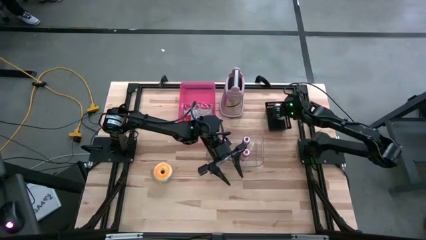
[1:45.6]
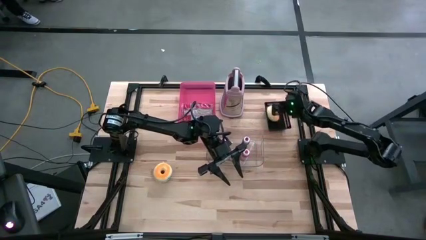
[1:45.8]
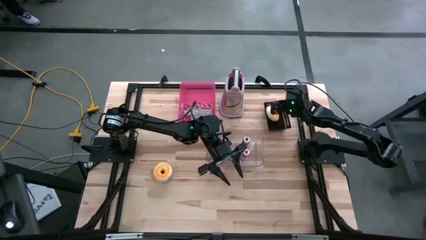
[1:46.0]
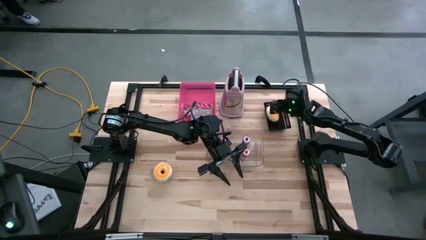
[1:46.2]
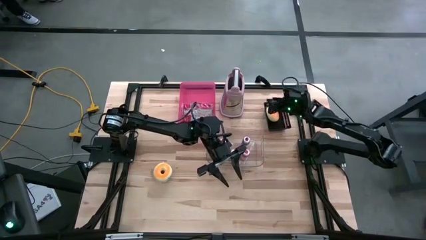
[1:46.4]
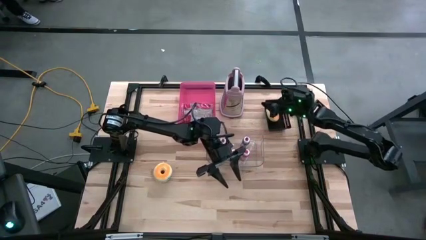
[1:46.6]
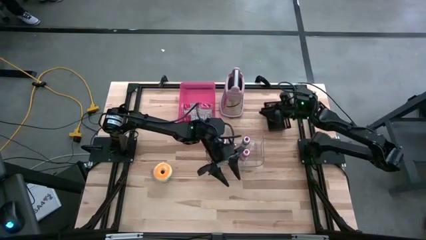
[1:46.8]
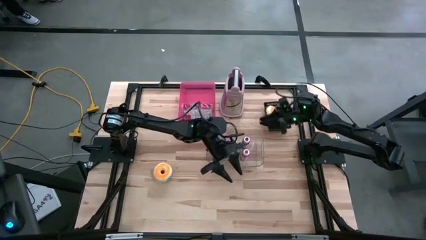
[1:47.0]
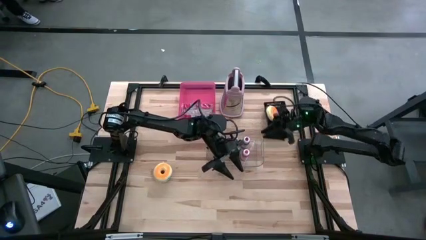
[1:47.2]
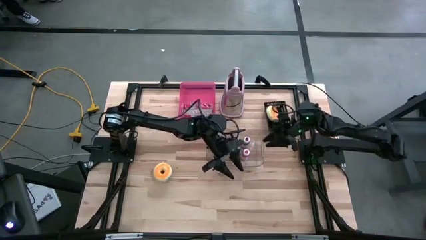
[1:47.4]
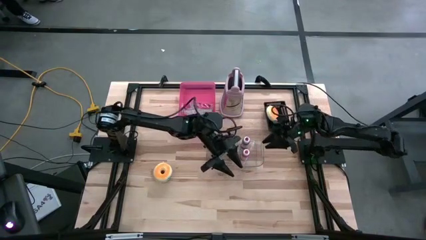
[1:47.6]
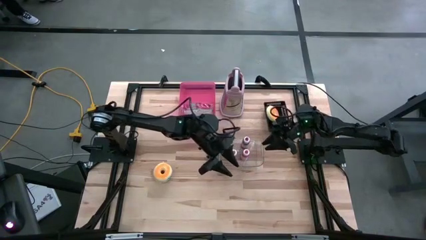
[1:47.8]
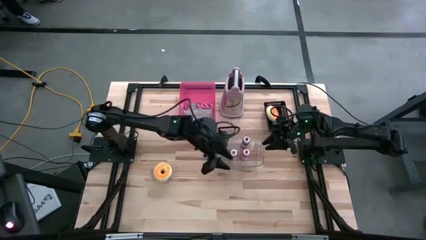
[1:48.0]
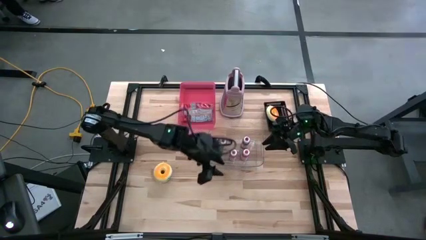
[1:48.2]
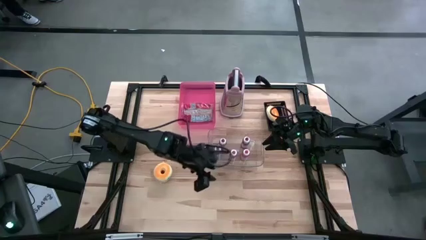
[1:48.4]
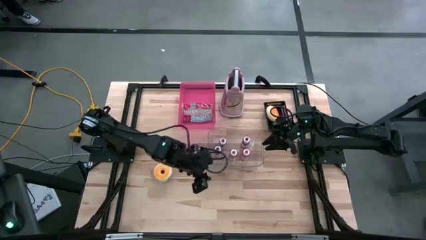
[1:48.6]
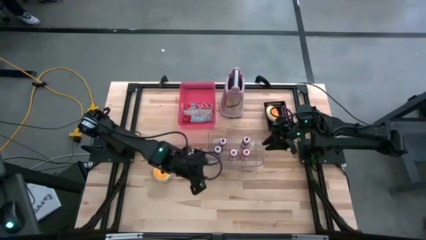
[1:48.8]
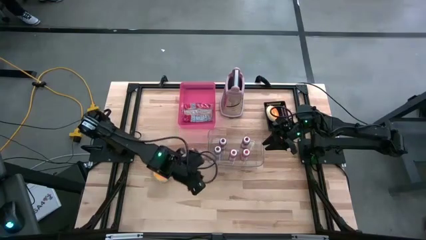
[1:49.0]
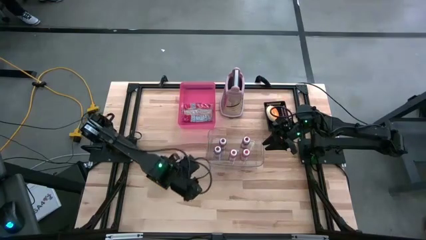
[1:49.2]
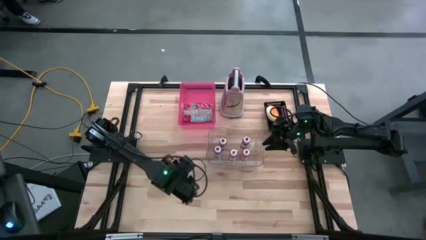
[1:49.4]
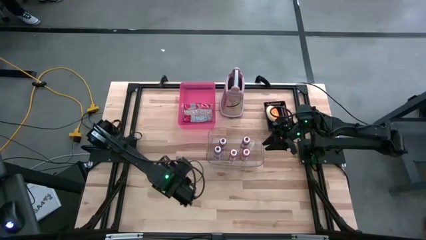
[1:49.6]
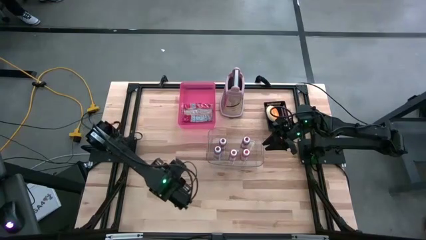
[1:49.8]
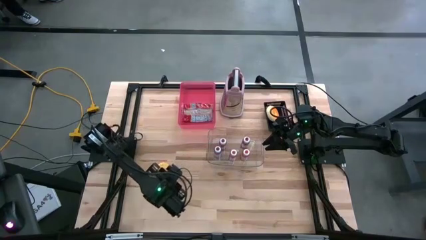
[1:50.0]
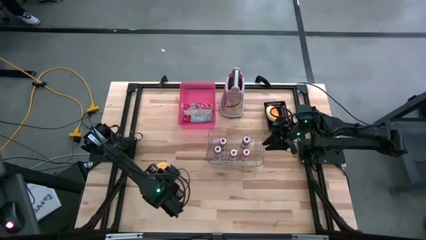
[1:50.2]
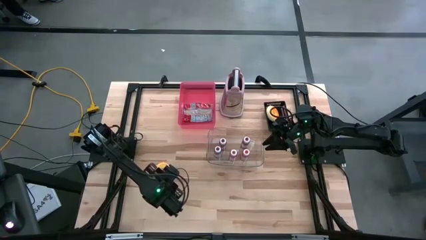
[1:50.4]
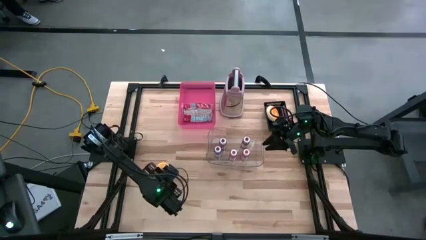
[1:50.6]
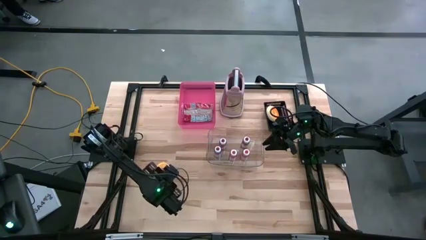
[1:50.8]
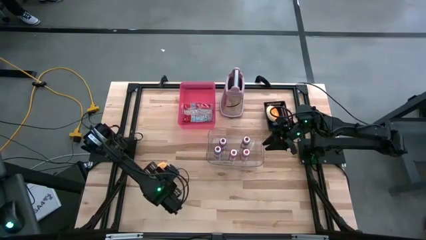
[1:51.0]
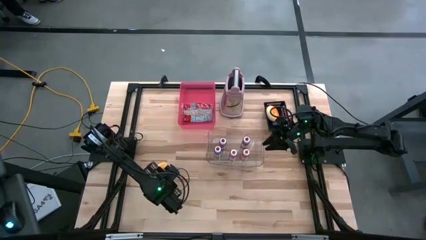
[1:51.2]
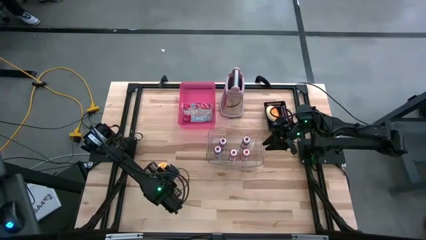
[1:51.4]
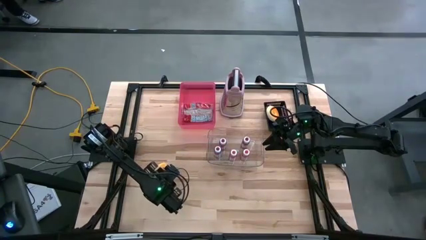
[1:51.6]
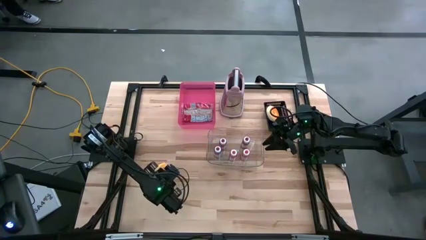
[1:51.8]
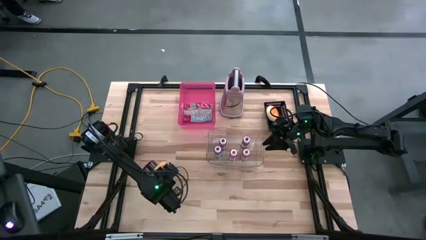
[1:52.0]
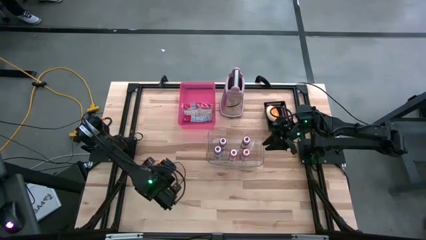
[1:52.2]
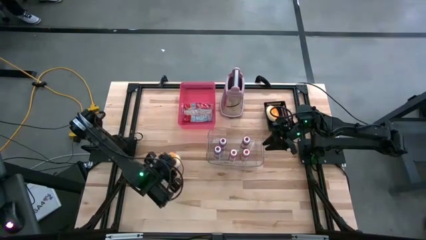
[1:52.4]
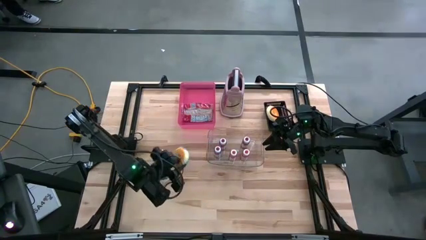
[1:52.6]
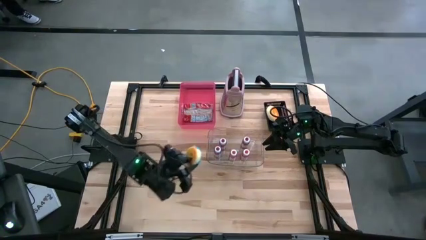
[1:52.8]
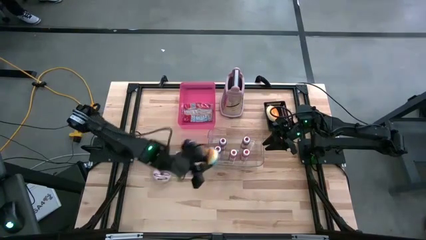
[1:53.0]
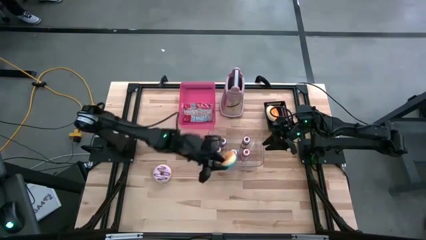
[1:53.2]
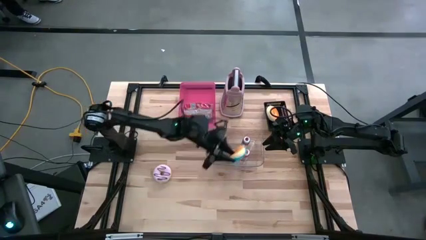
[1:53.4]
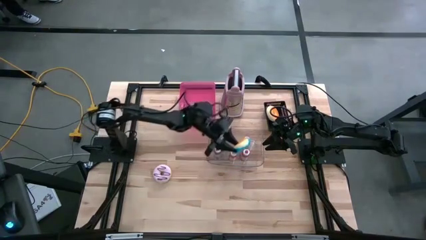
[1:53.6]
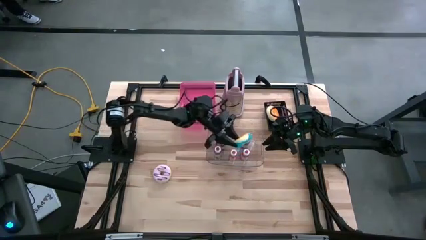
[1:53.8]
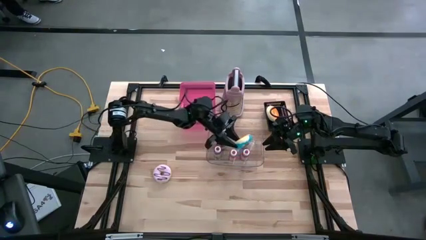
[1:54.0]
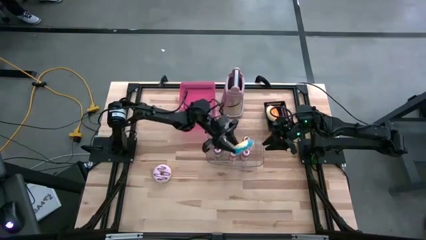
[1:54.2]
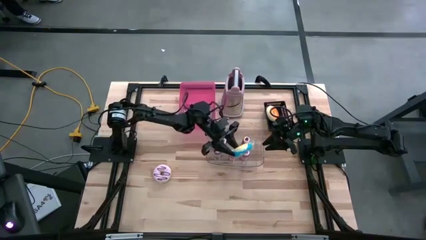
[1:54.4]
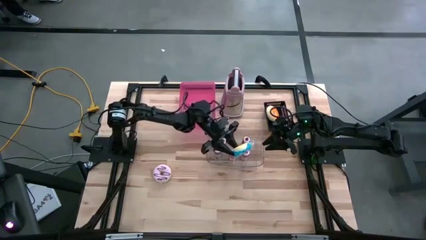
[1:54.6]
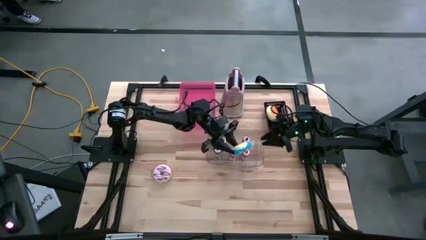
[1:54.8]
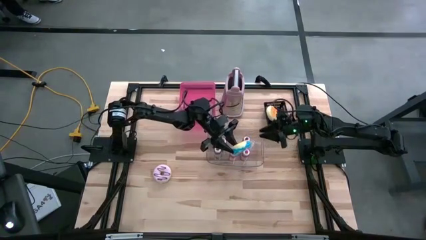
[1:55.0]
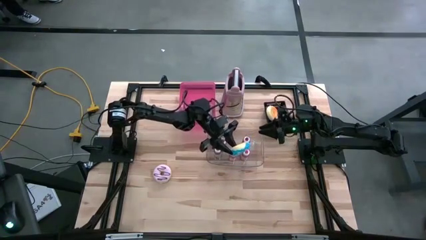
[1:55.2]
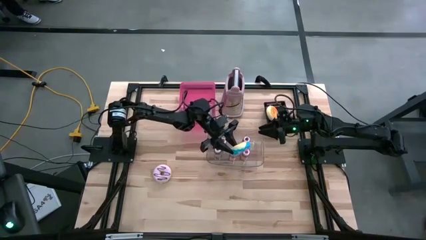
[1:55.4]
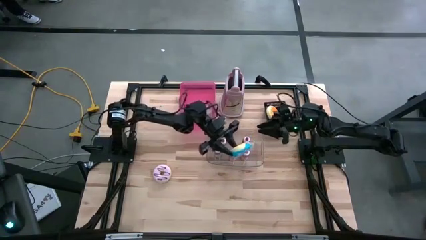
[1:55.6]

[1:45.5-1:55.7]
Put the blue donut into the black bin
